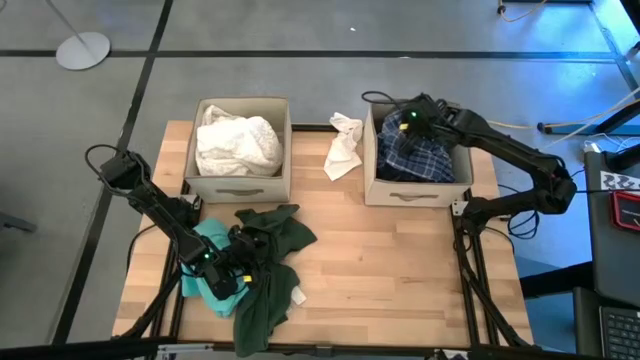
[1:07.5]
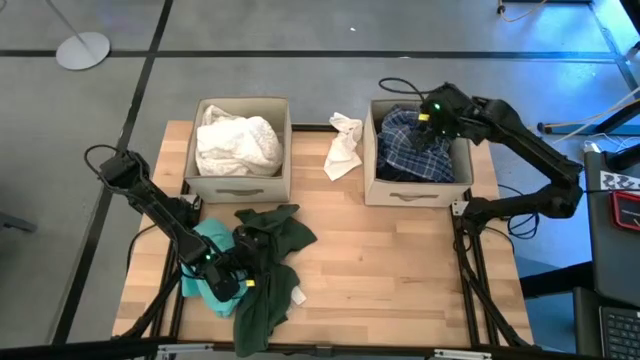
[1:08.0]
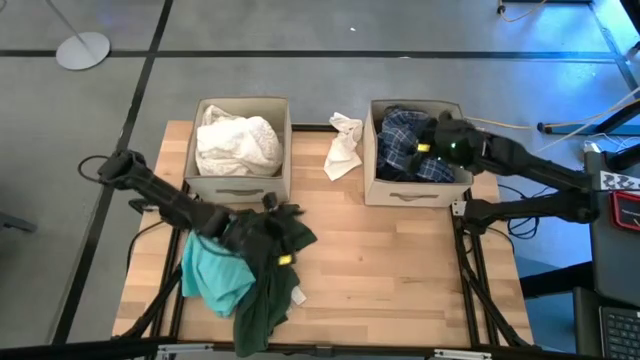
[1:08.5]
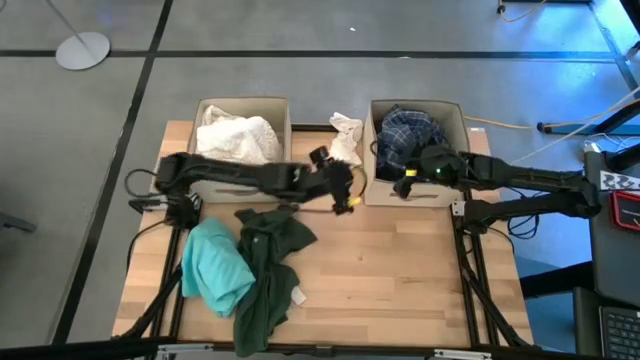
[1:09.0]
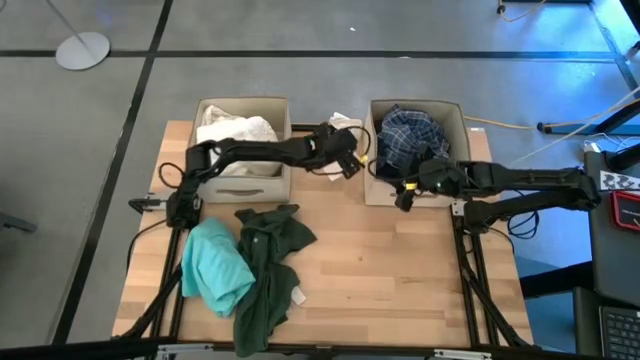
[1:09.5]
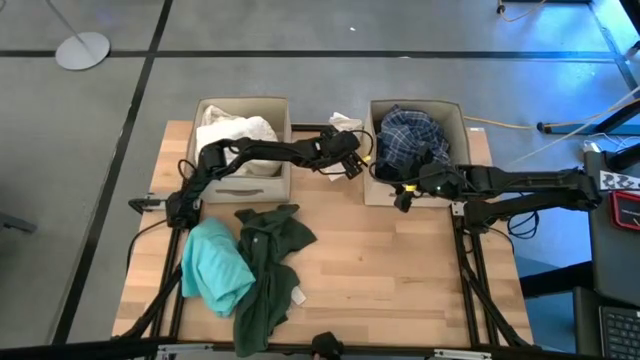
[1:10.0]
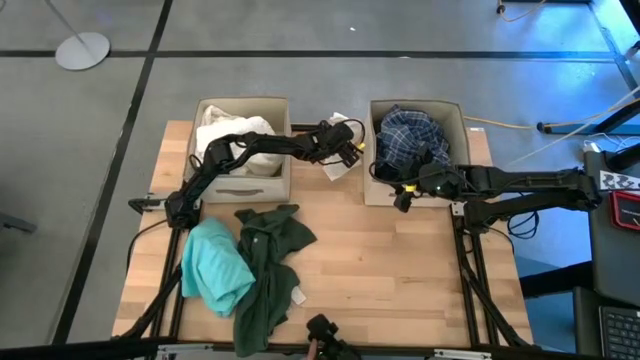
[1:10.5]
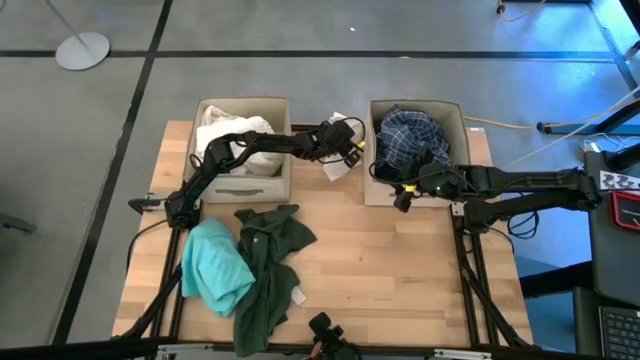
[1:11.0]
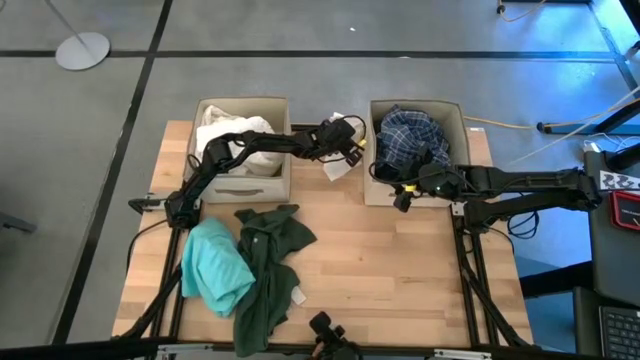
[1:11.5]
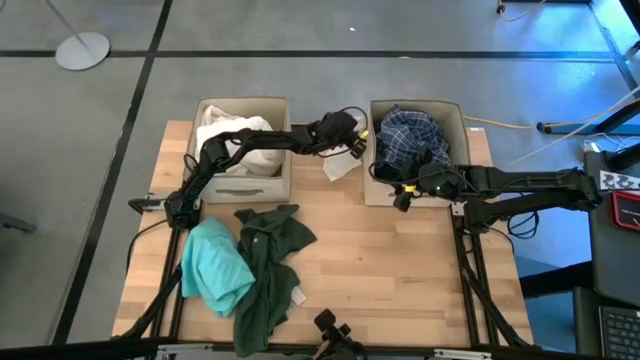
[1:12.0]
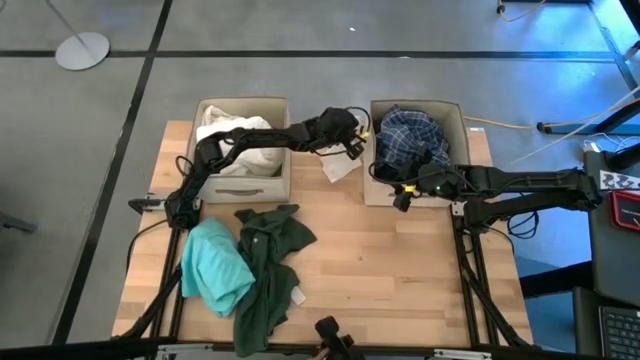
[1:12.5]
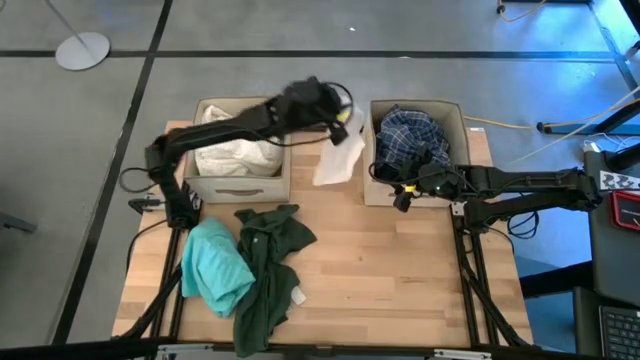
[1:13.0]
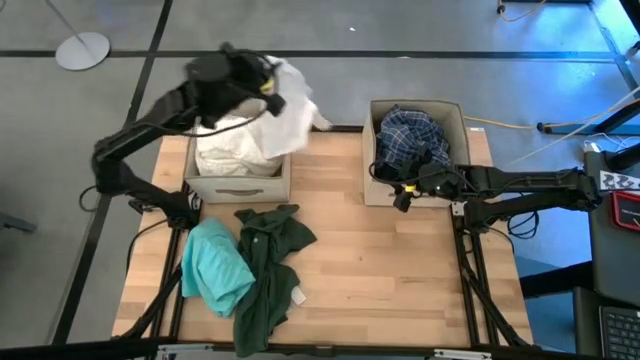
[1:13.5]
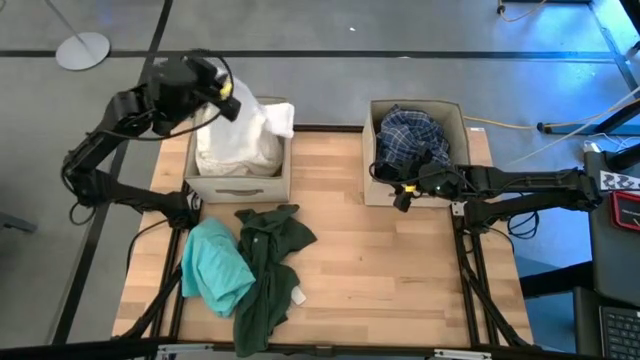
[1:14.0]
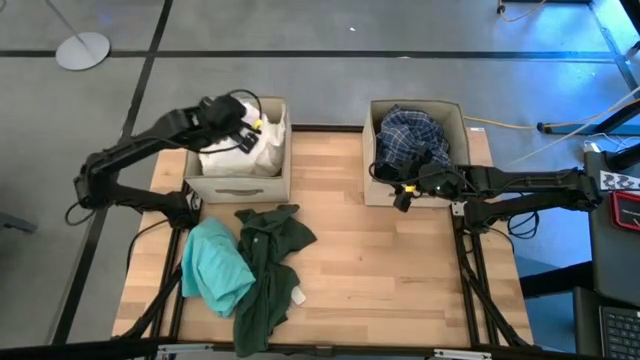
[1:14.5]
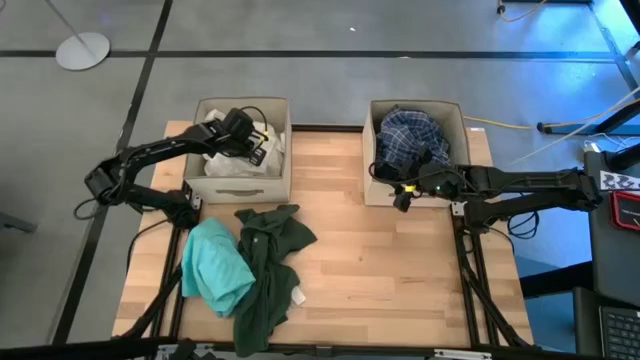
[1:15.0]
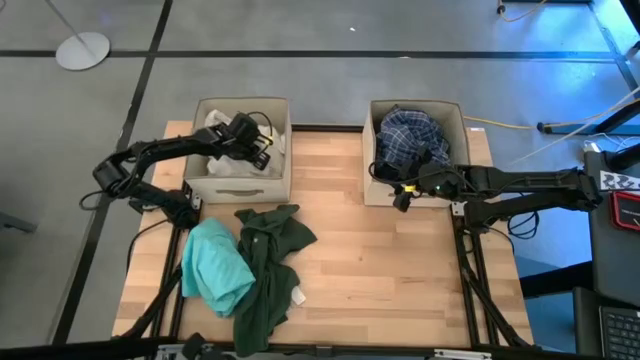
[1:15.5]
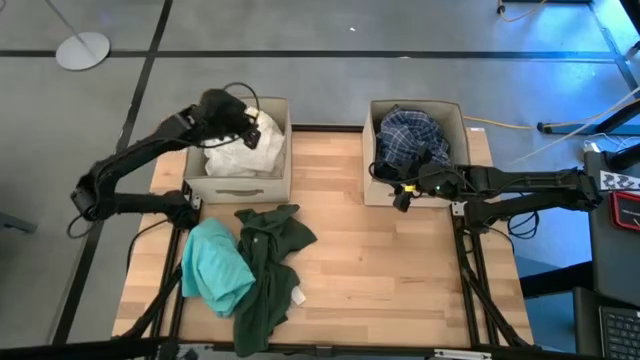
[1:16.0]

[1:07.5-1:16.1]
Task: Sort clothes
Put the white shorts into the left brown bin

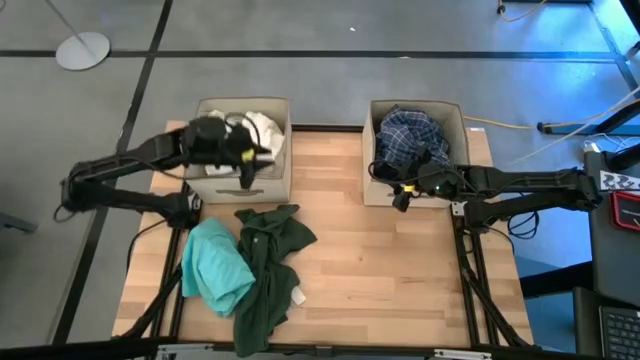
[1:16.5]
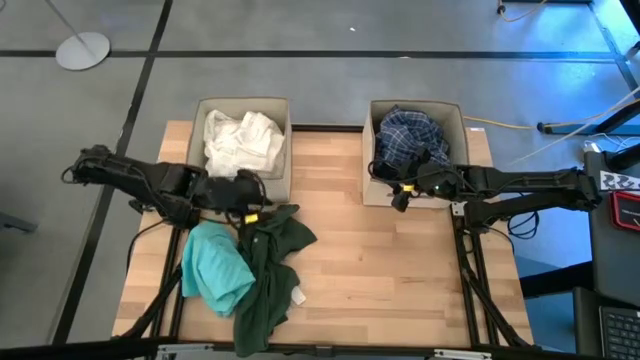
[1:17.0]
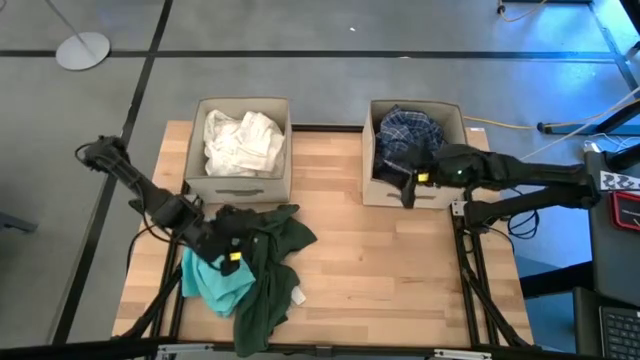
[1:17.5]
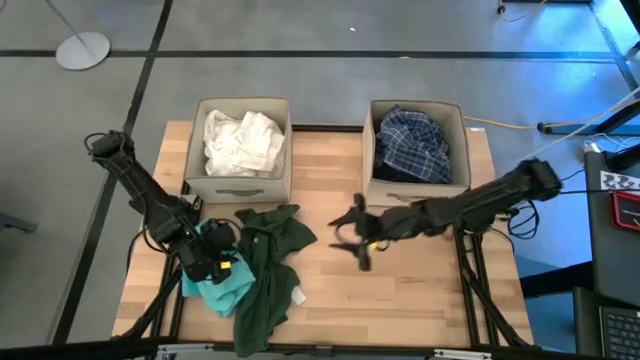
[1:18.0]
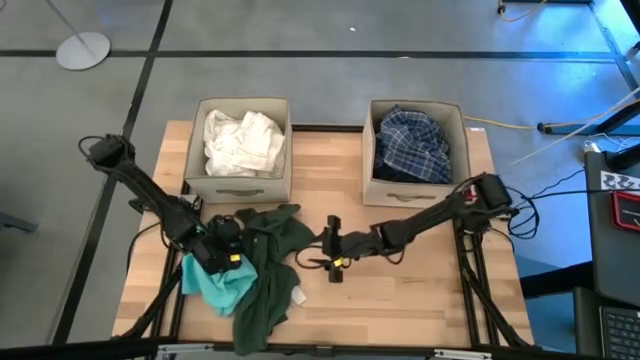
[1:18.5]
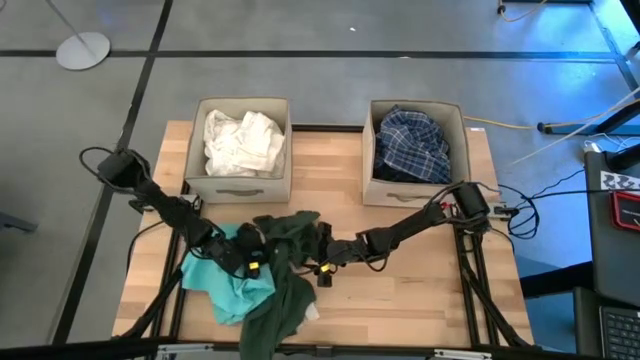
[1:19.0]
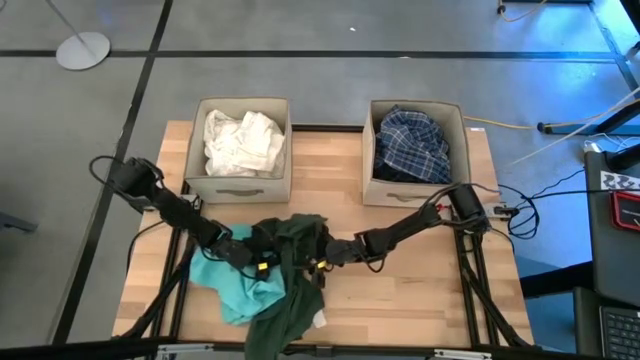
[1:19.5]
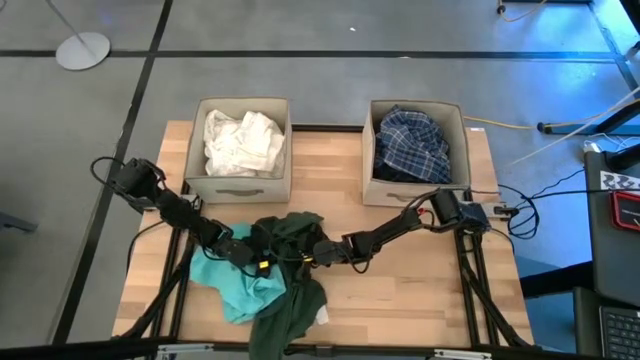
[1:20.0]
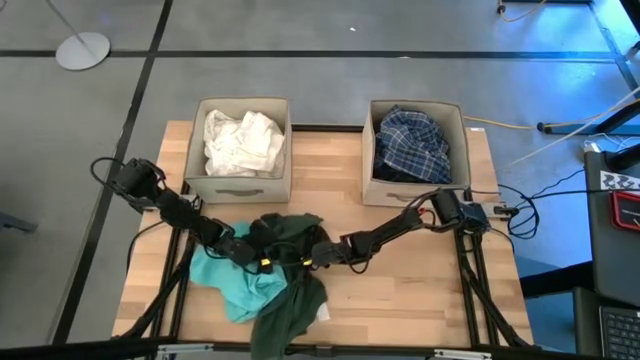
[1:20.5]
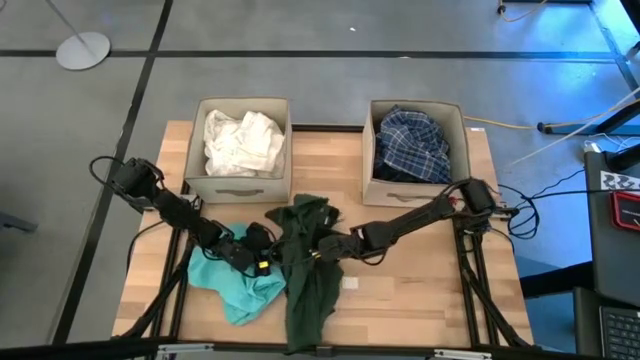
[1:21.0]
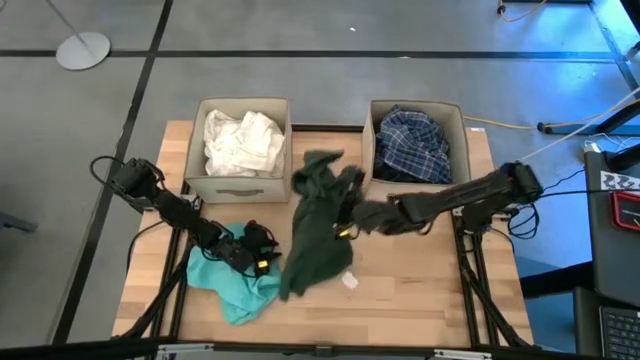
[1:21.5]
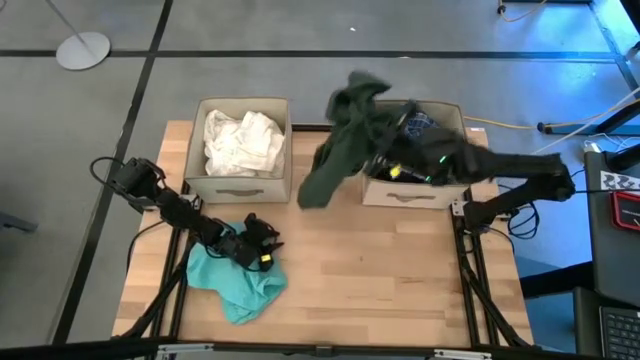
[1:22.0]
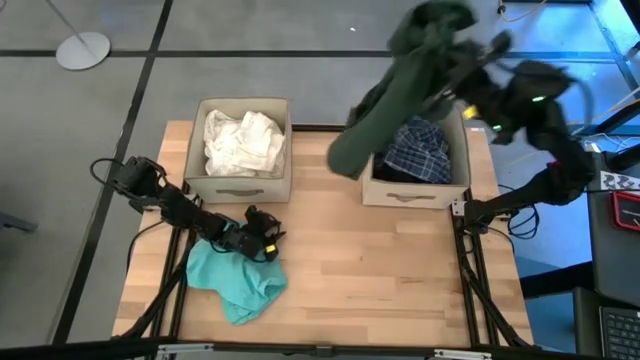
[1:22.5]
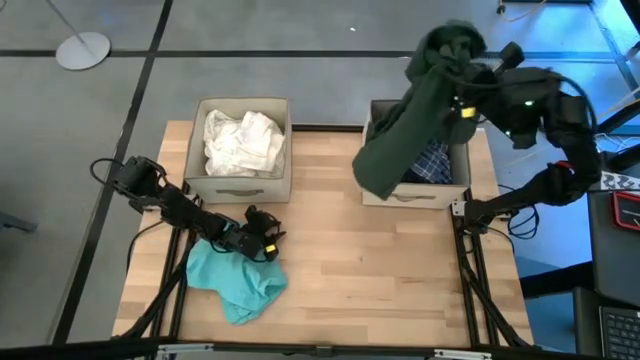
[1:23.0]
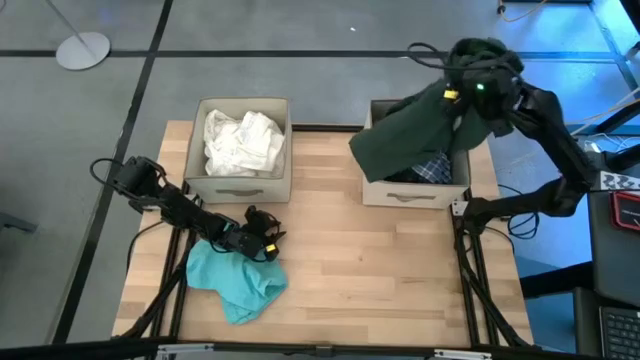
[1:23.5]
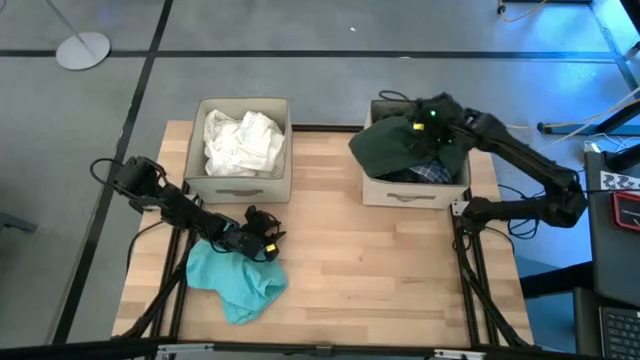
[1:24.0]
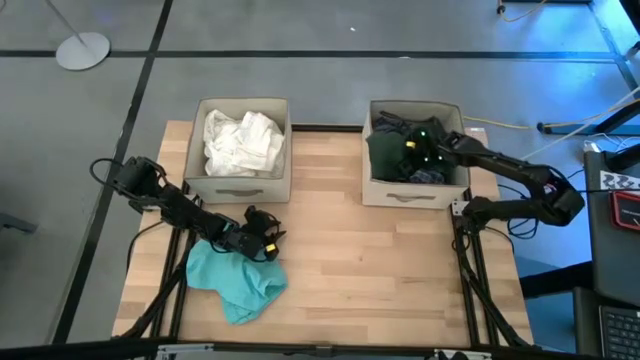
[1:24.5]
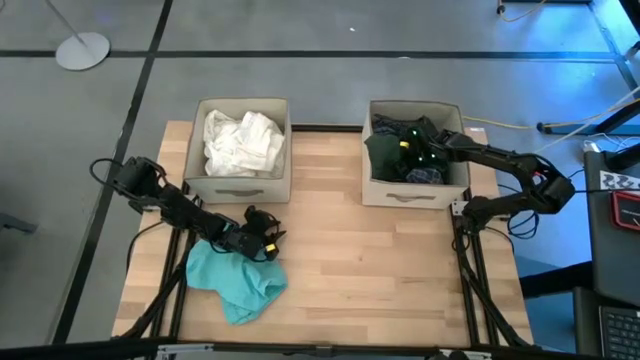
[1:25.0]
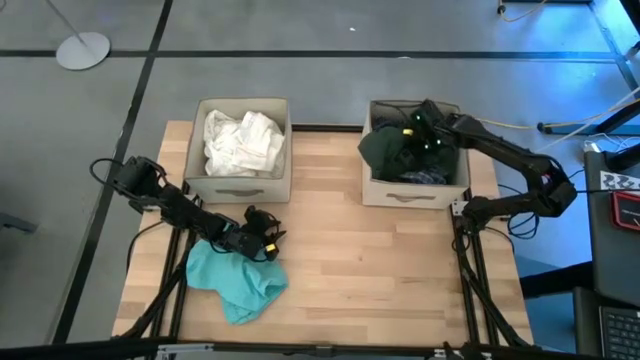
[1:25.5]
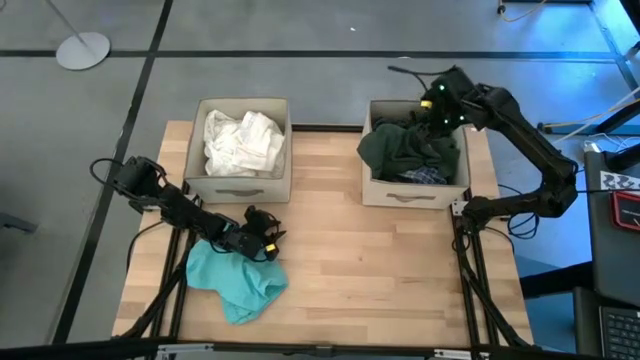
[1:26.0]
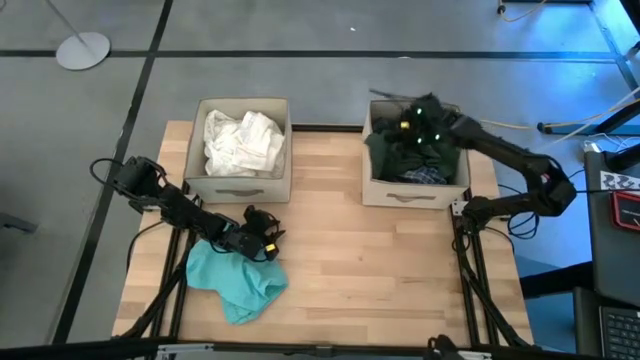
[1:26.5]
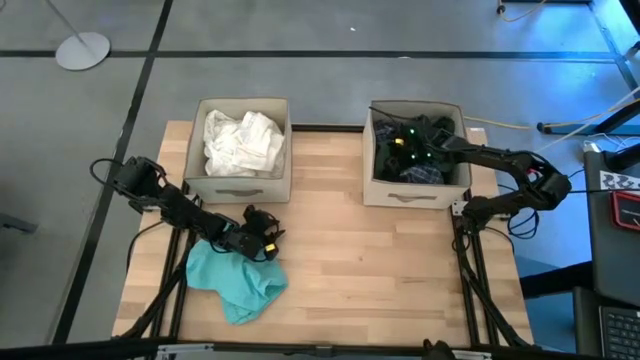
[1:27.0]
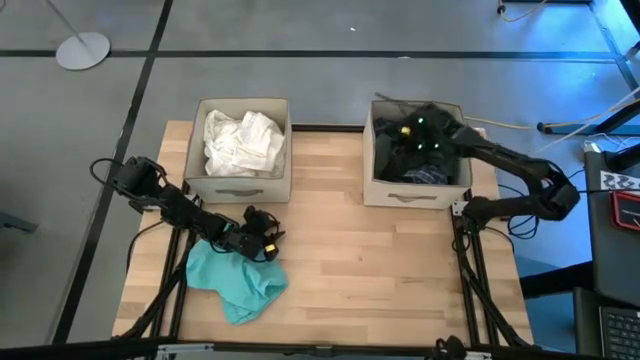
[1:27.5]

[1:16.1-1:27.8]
Put the green jacket into the right brown bin
